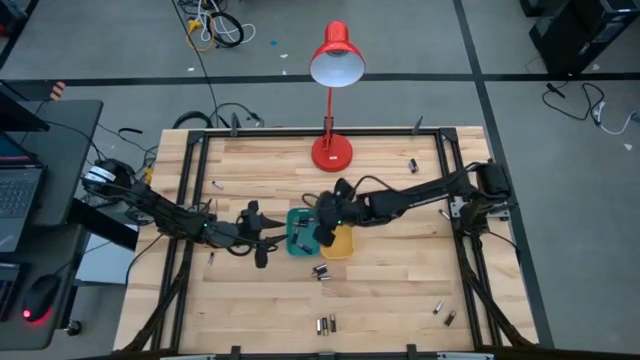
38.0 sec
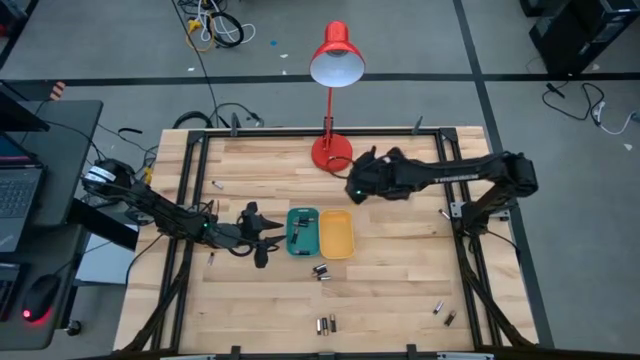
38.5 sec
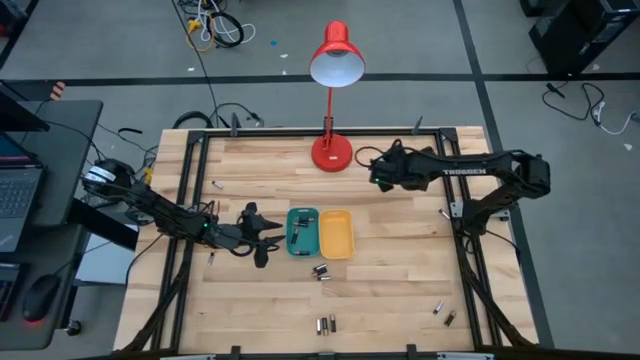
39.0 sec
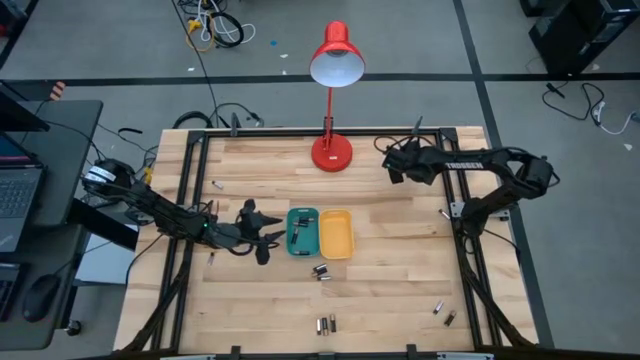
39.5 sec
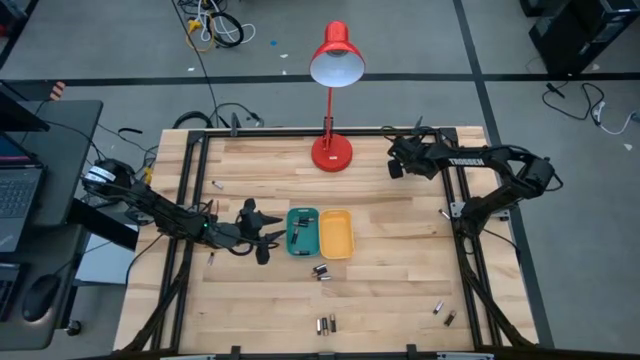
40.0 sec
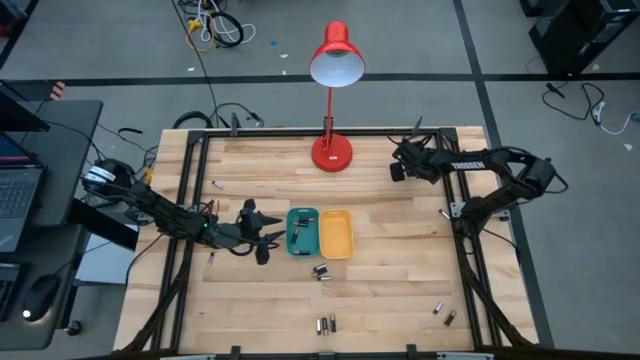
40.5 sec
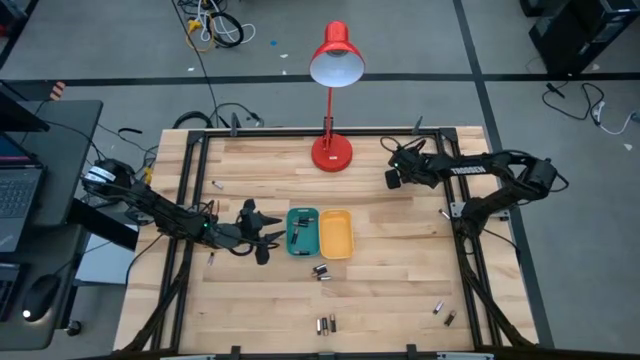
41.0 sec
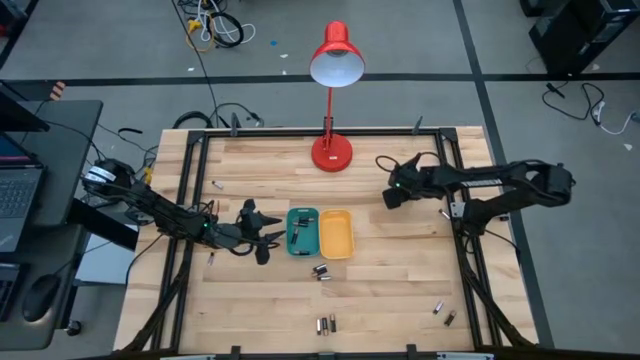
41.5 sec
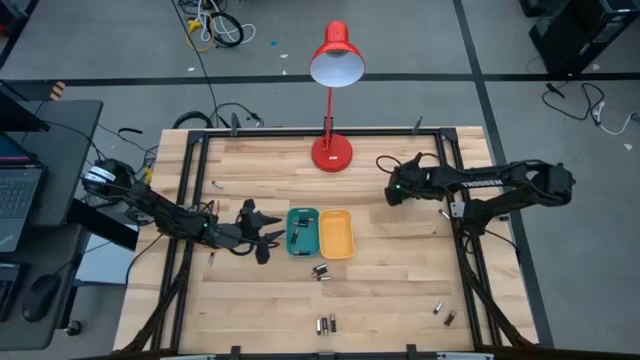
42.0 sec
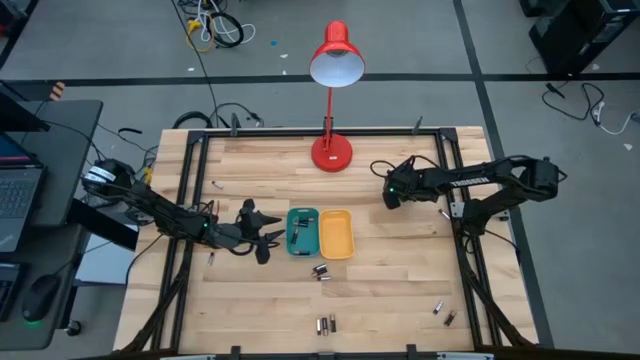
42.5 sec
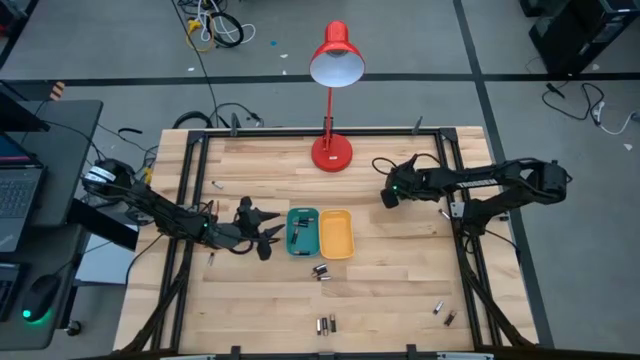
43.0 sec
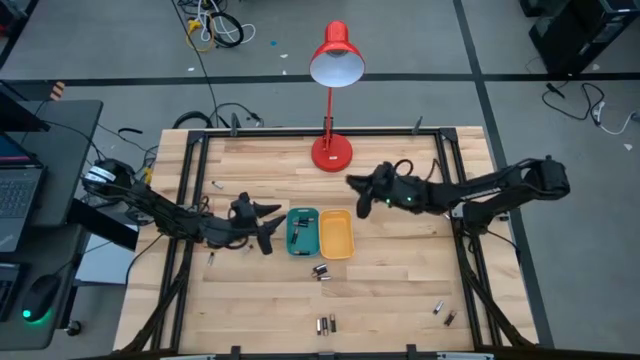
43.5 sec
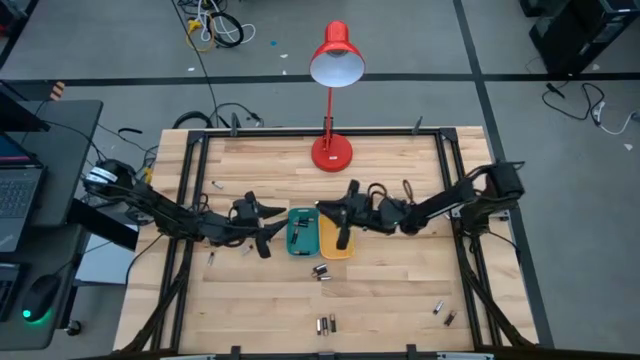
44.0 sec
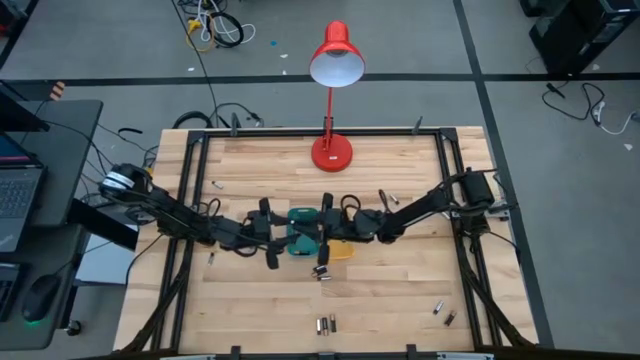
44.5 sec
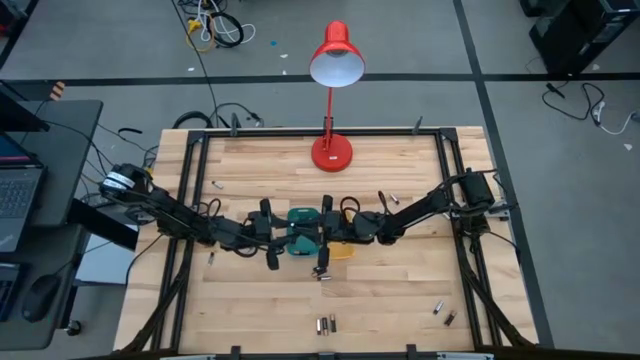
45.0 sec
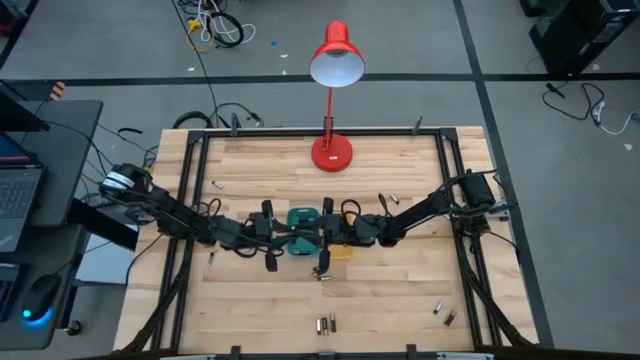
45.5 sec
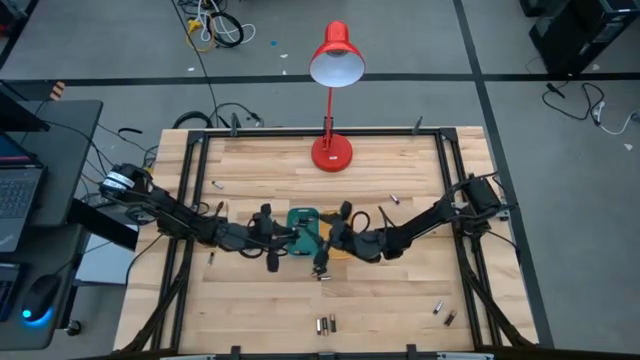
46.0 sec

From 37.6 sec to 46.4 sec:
Task: Sort batteries
Put the black battery into the blue bin

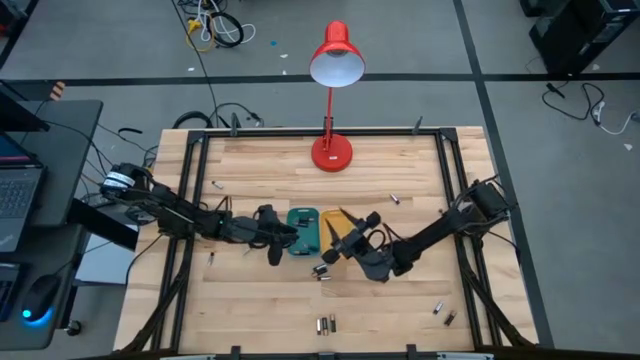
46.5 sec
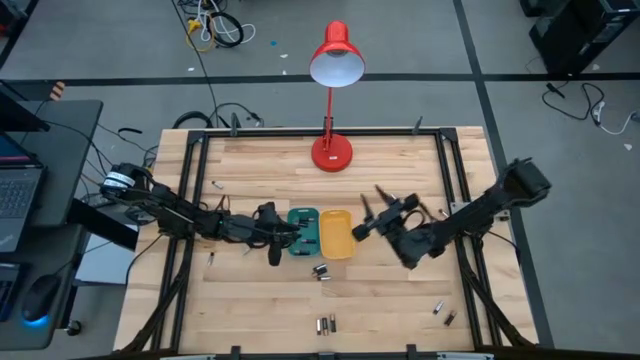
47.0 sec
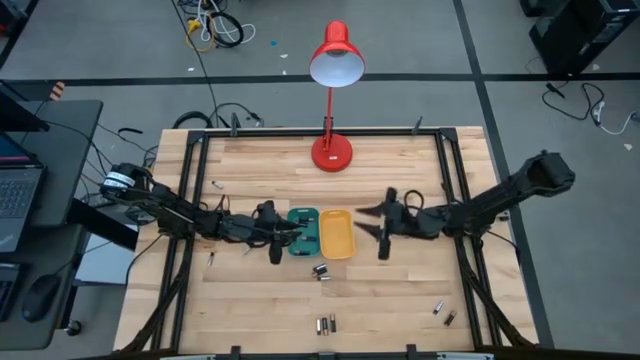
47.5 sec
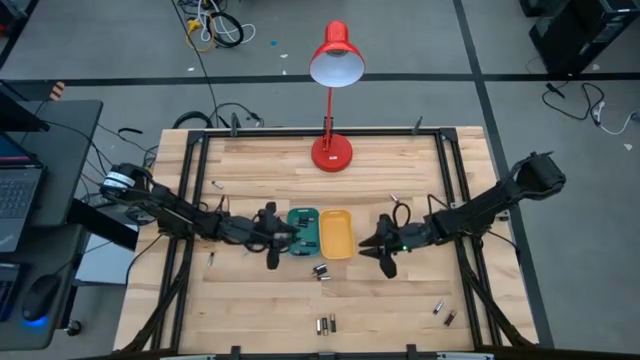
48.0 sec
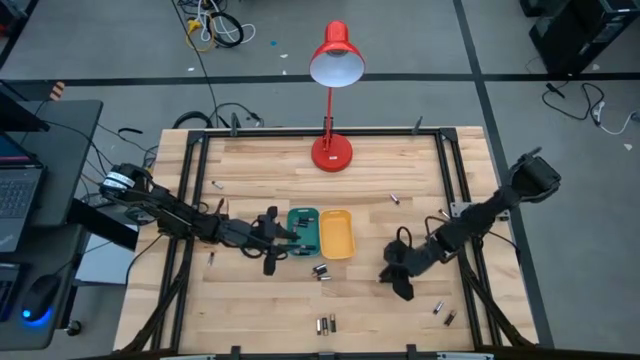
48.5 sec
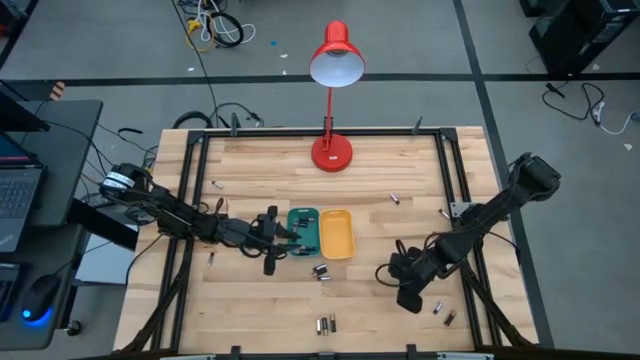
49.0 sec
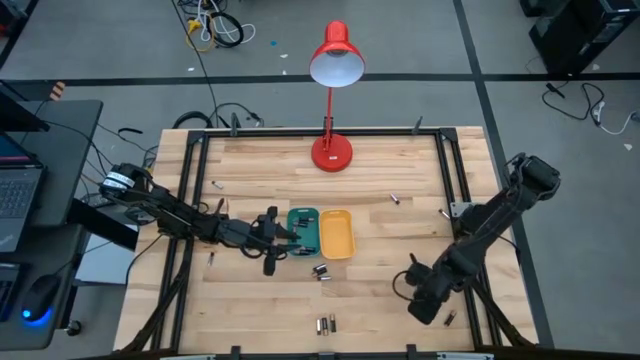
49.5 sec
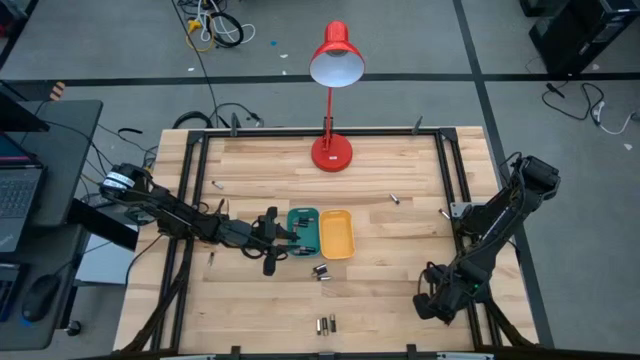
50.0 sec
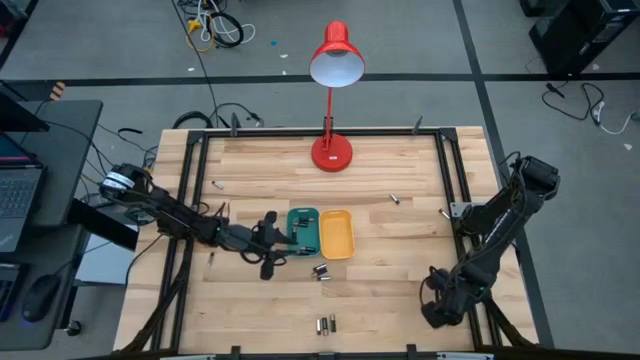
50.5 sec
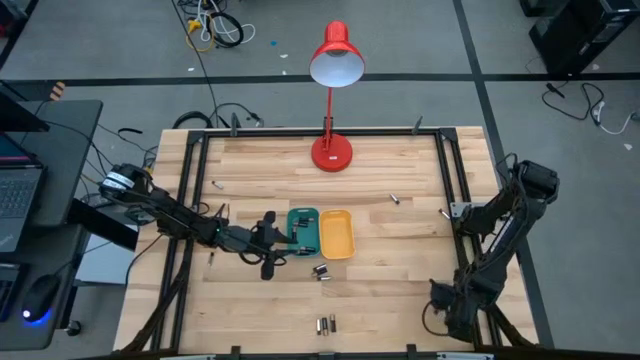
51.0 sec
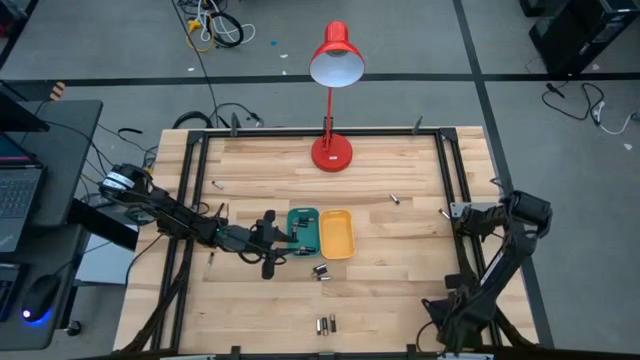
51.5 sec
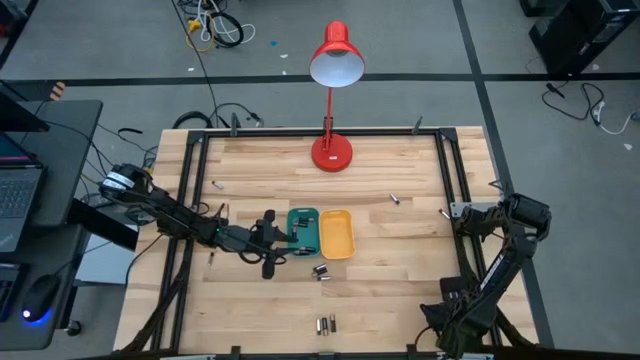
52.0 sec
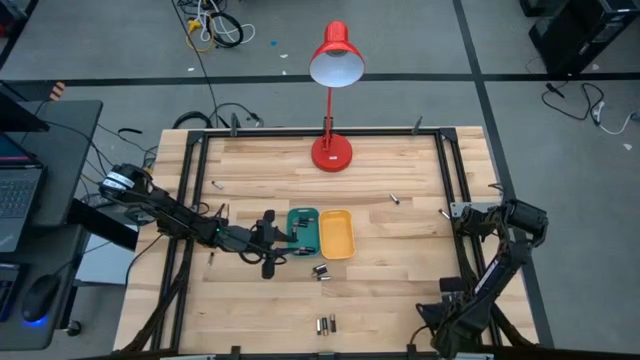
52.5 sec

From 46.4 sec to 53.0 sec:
Put the black battery into the blue bin

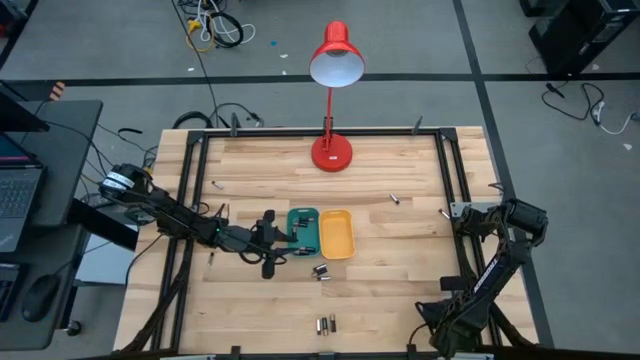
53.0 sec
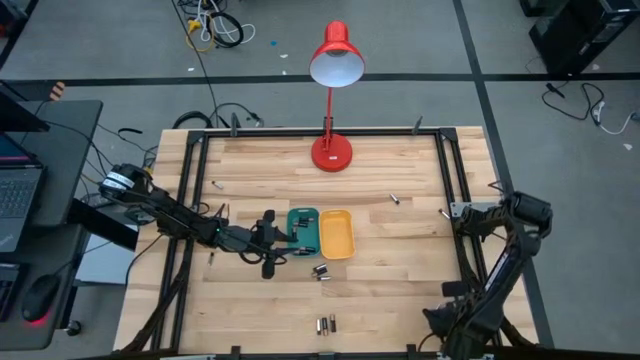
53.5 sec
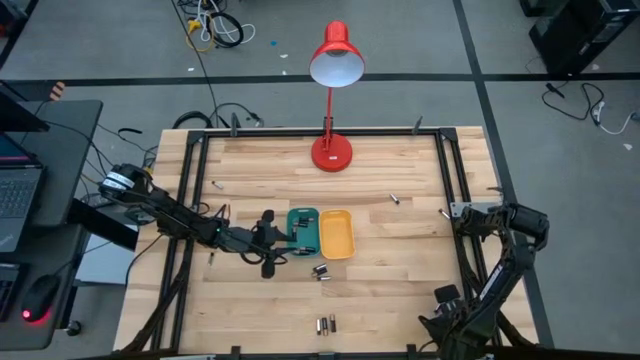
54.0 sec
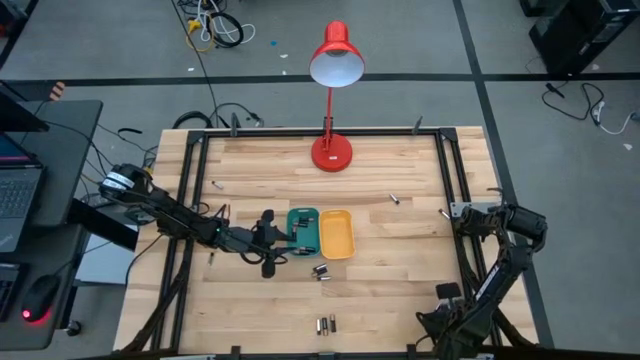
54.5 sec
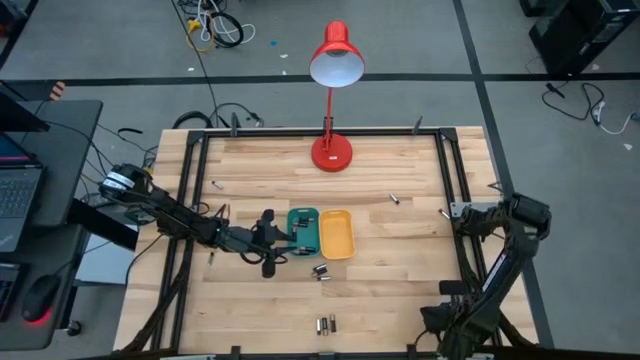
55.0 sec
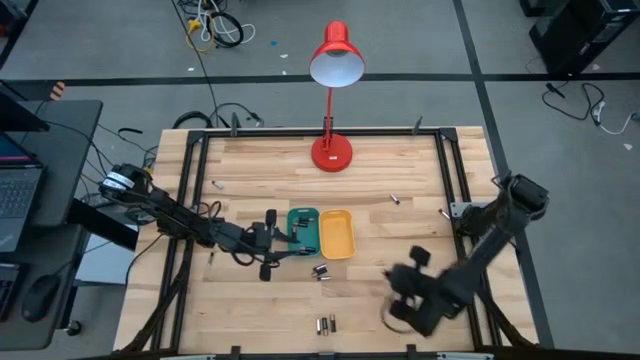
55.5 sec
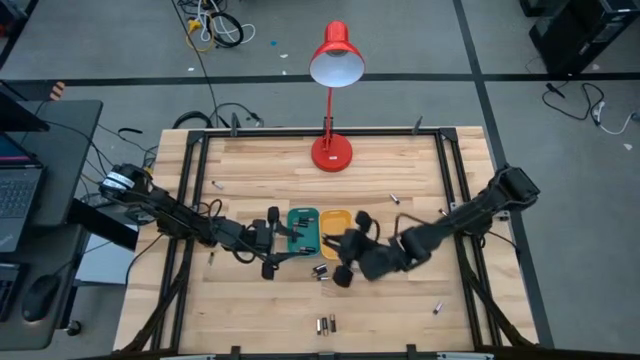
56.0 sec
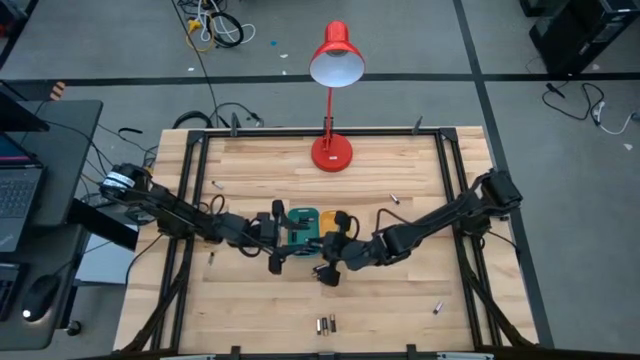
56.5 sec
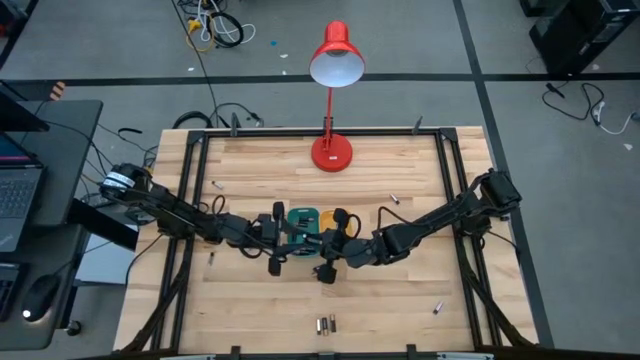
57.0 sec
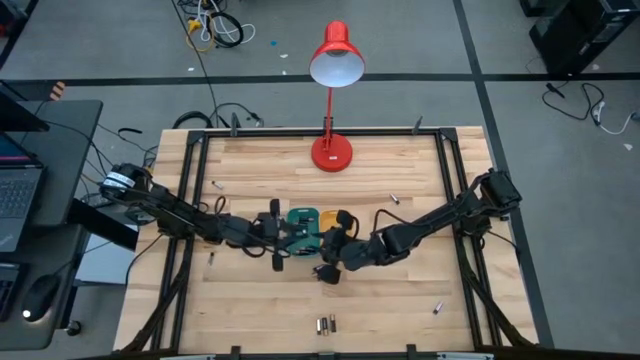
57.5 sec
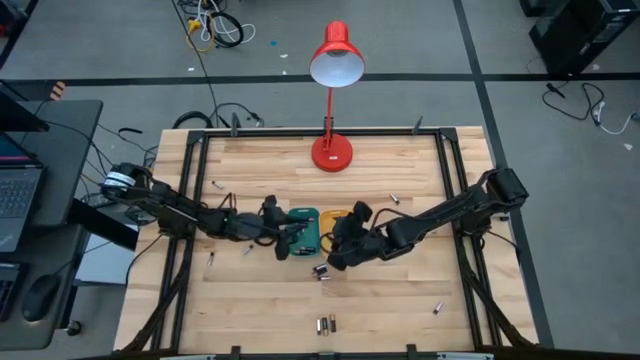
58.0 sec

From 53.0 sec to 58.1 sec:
Put the black battery into the blue bin

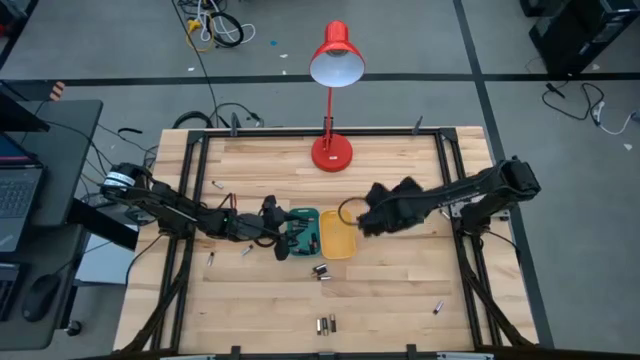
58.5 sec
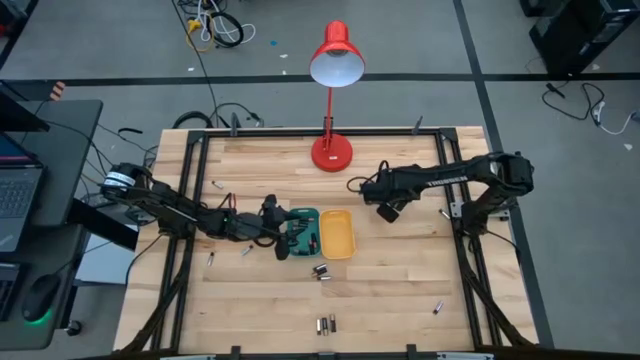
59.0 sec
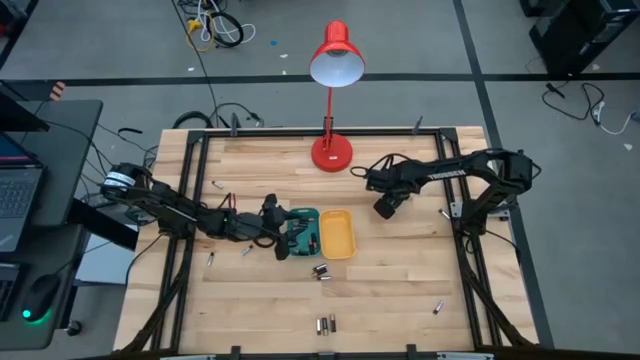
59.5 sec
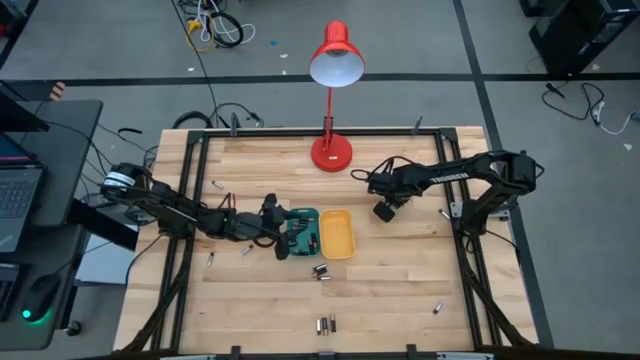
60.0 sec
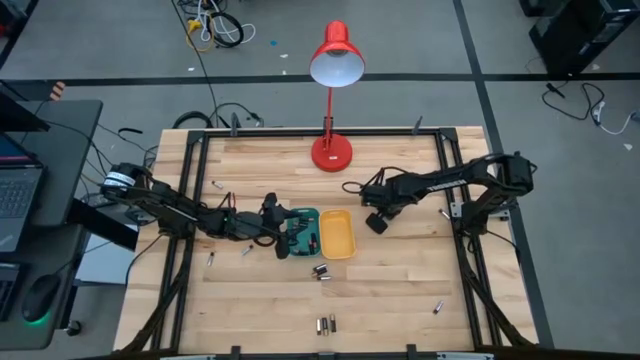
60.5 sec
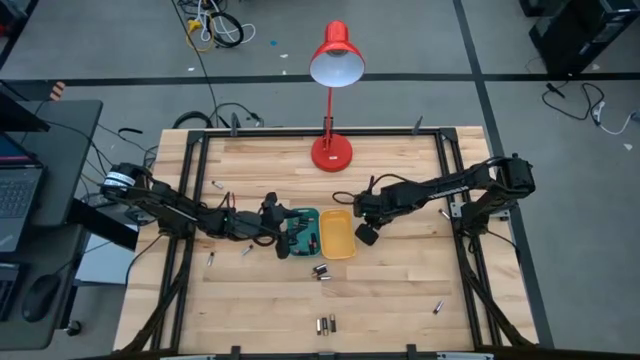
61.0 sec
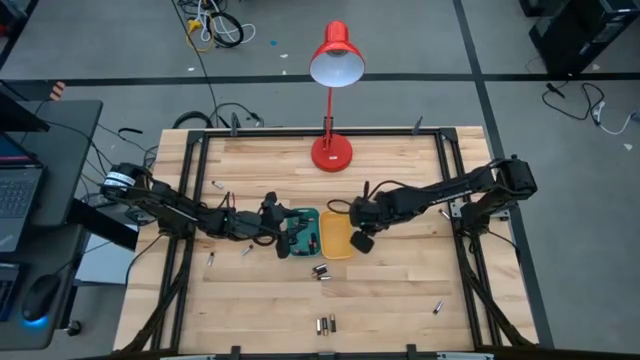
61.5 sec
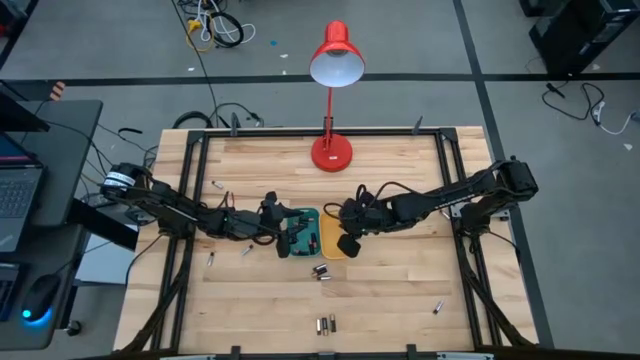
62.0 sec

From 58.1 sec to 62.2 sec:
Put the white battery into the yellow bin
